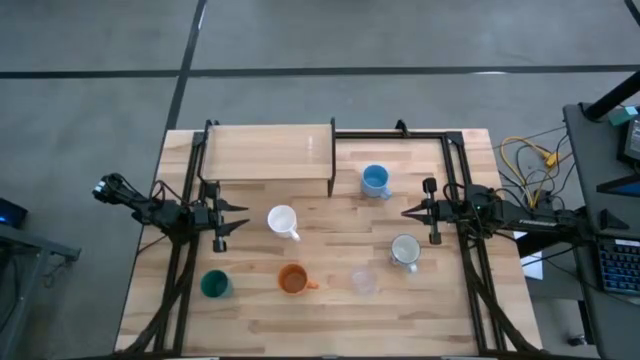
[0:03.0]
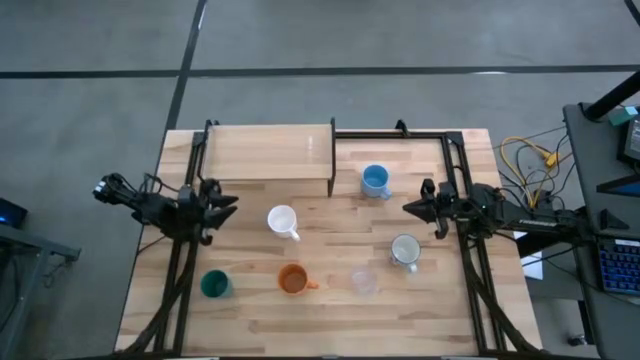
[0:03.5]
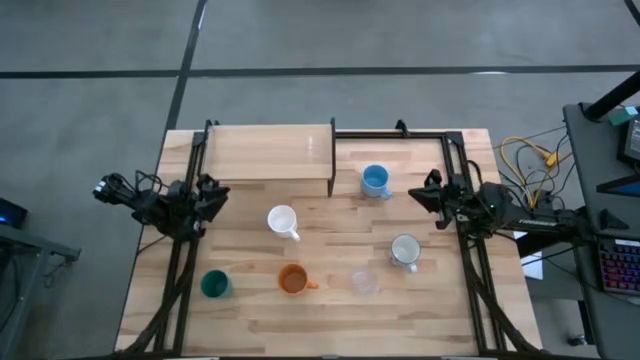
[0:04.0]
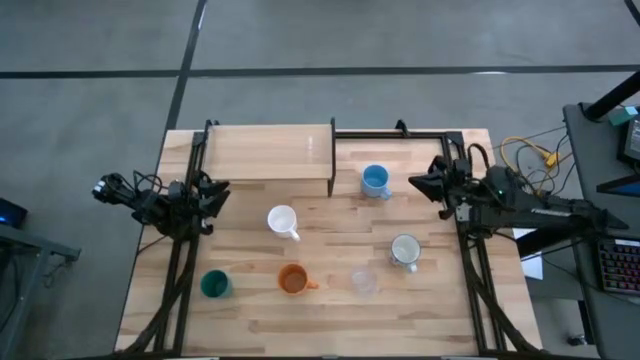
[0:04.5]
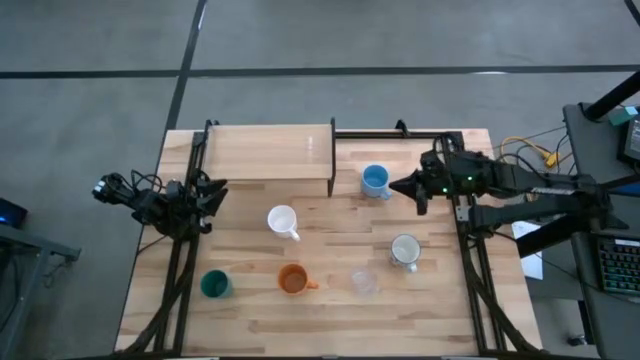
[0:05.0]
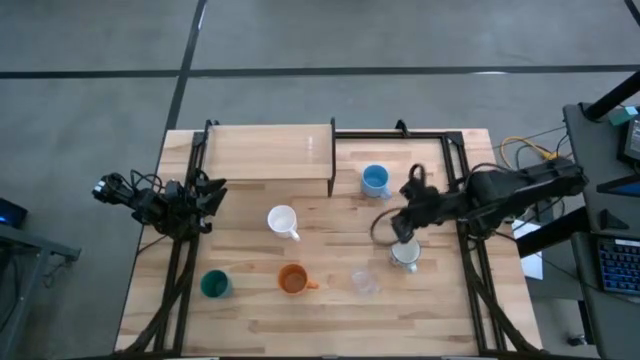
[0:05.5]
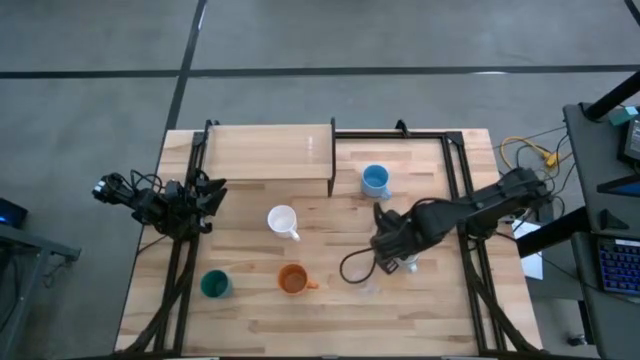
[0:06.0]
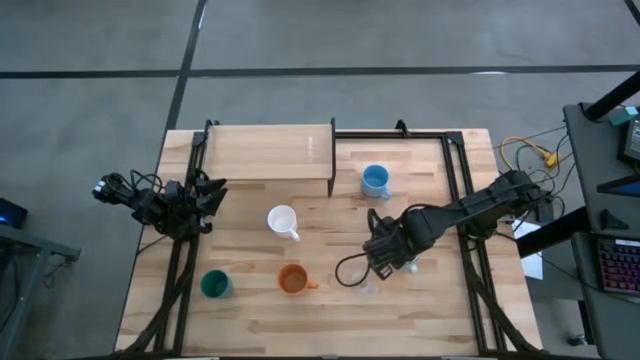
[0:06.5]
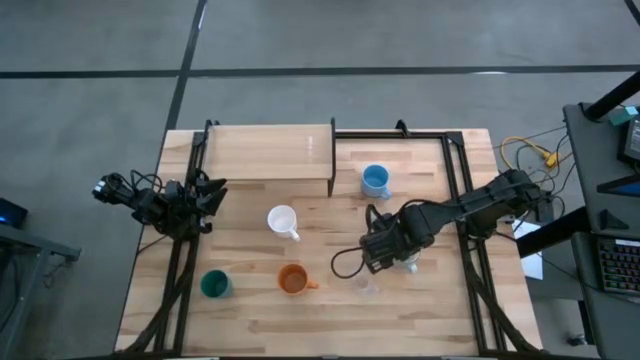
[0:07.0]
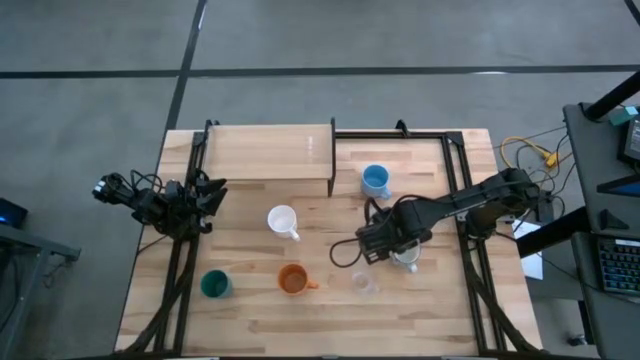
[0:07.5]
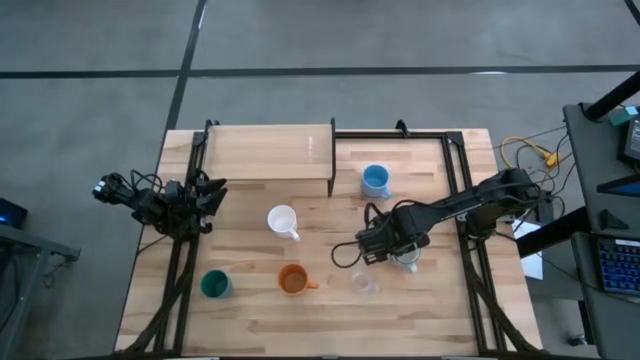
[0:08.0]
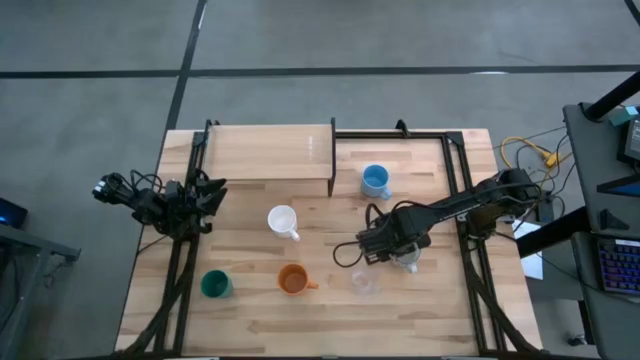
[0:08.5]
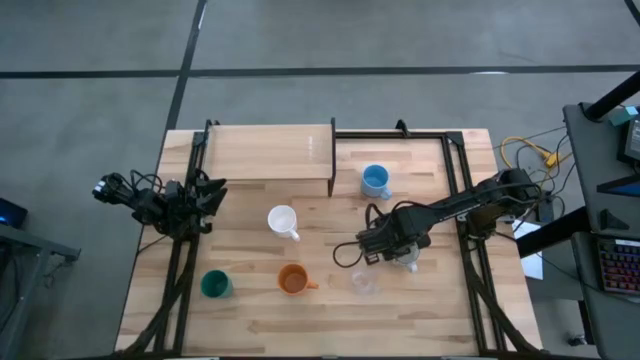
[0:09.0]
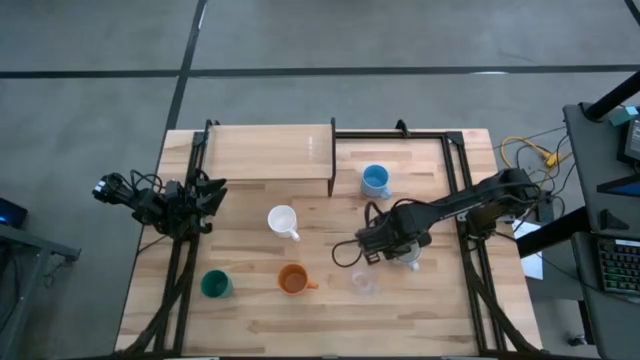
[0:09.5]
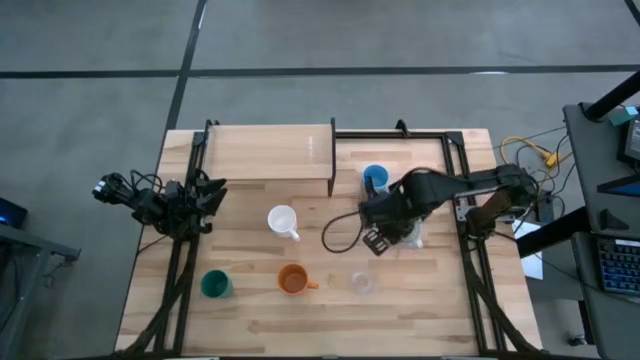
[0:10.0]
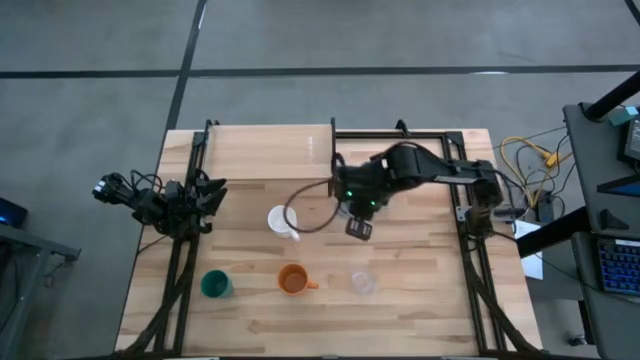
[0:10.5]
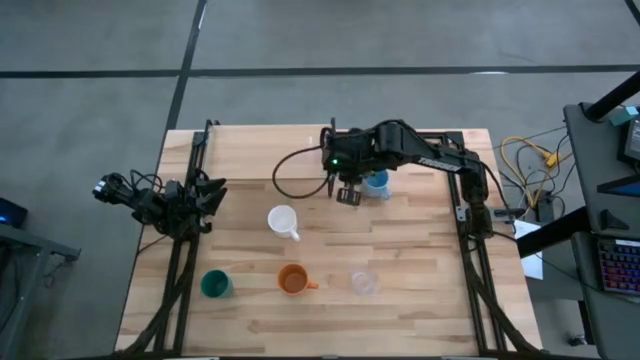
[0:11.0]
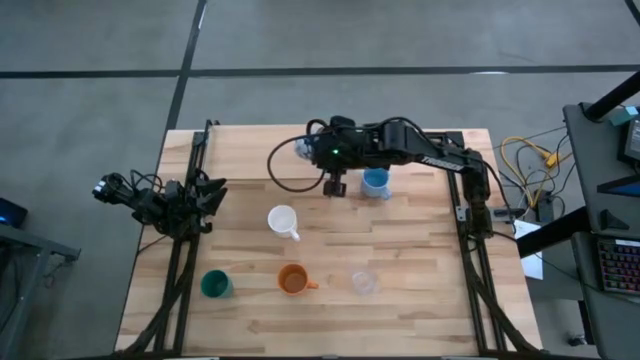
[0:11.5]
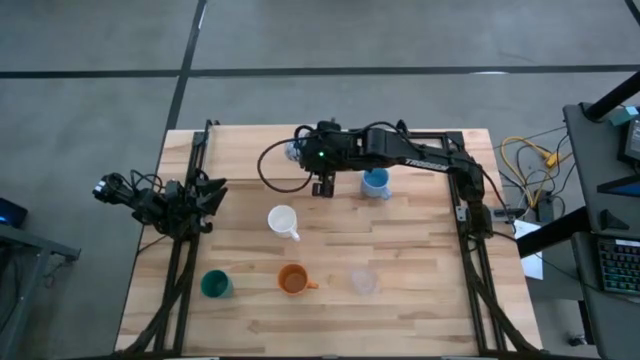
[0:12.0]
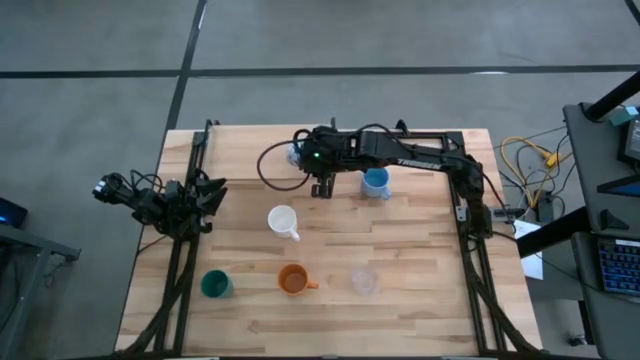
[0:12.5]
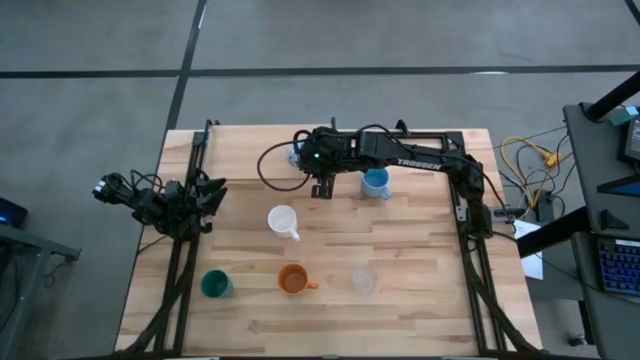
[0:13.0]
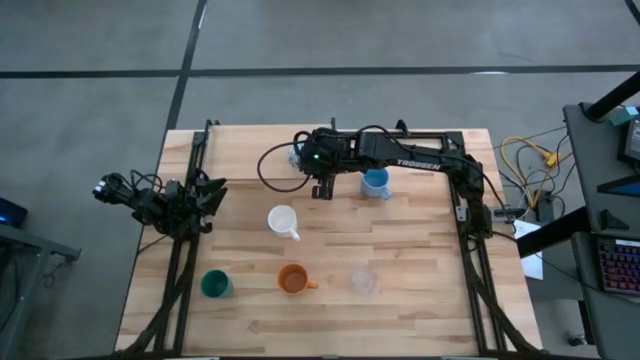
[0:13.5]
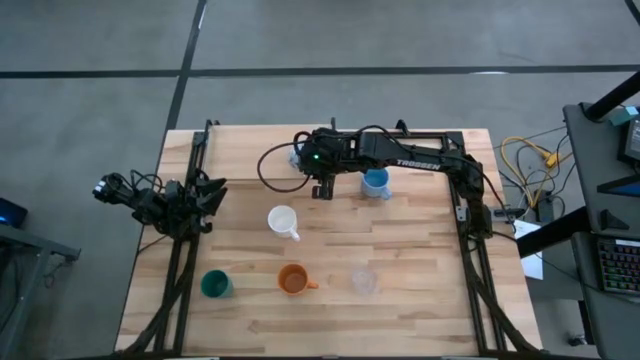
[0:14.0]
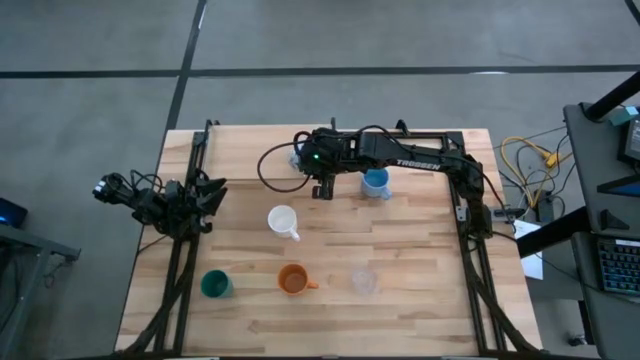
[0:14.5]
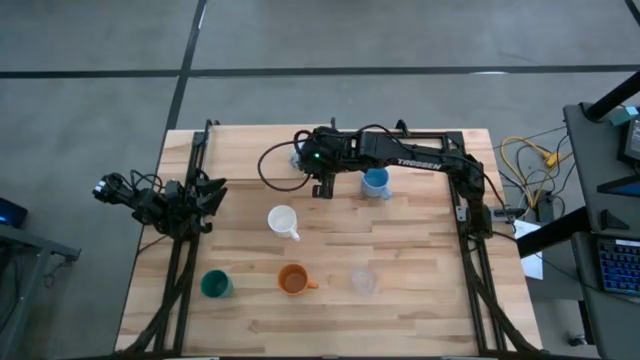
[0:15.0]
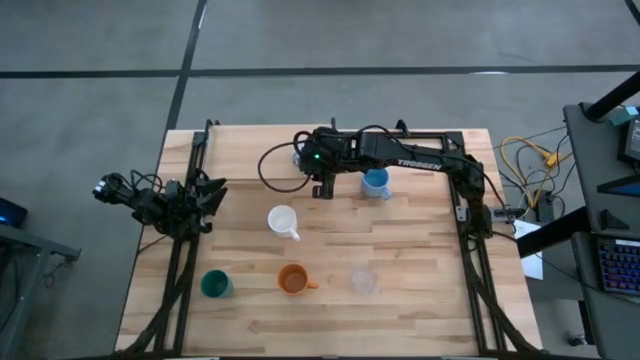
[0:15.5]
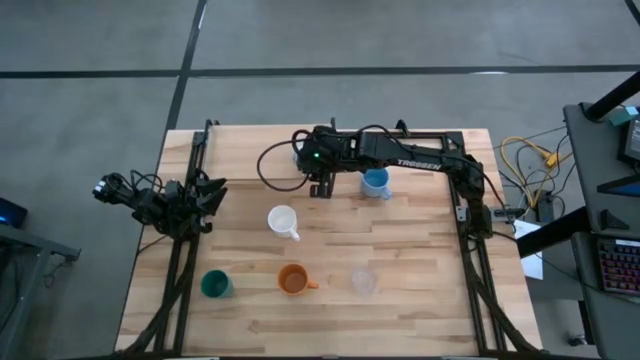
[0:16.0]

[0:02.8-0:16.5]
Task: Stack small to large cups/mugs on shelf
Put the blue patterned mug on the shelf

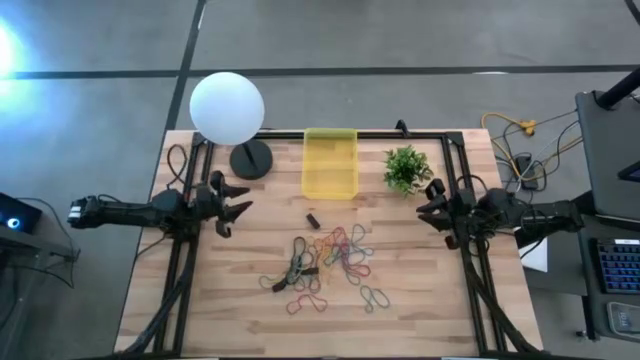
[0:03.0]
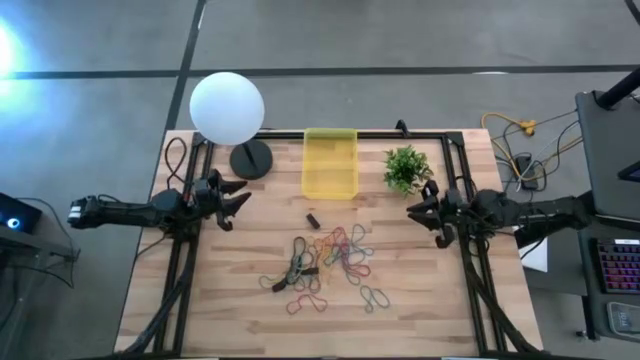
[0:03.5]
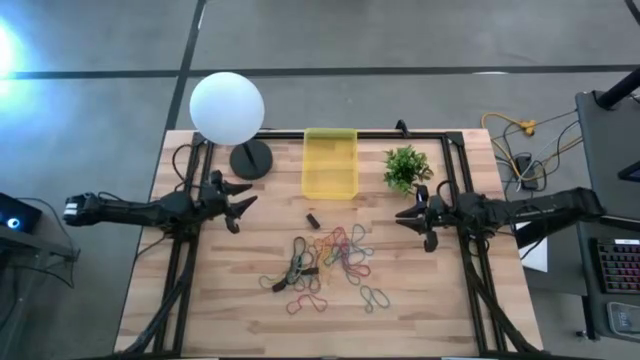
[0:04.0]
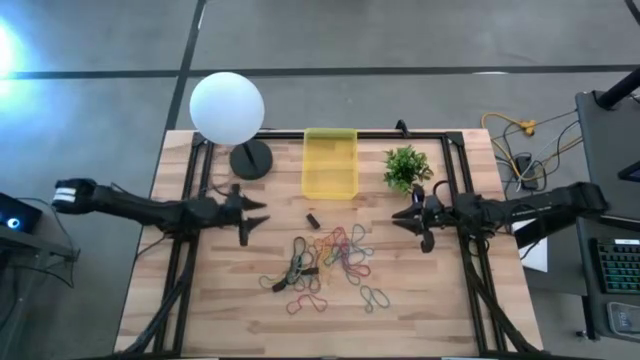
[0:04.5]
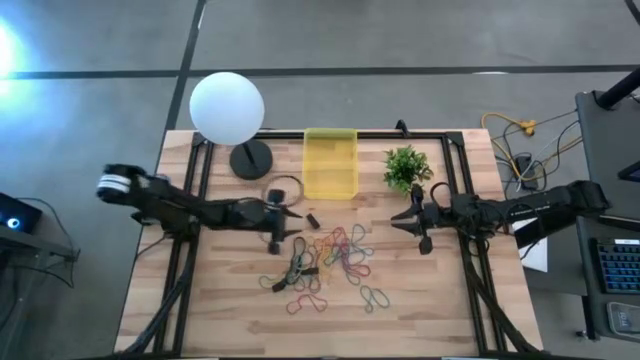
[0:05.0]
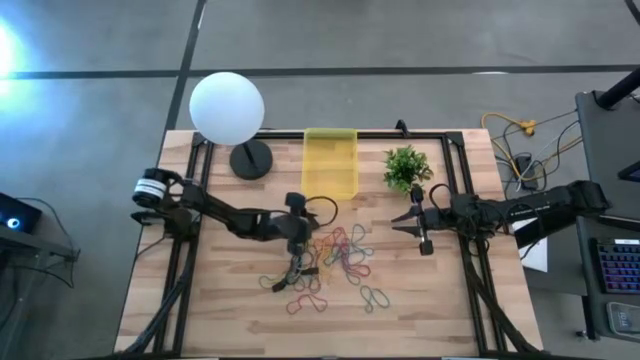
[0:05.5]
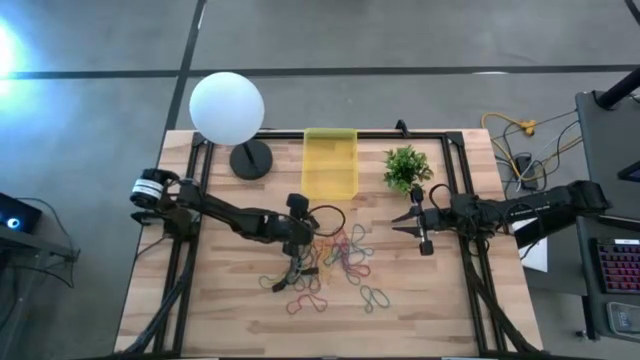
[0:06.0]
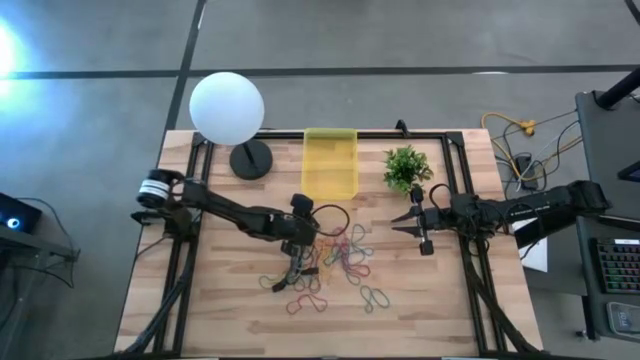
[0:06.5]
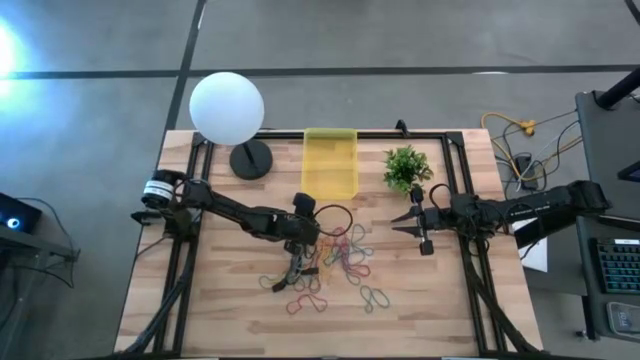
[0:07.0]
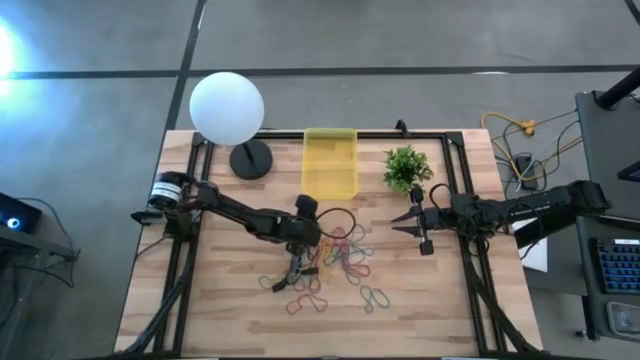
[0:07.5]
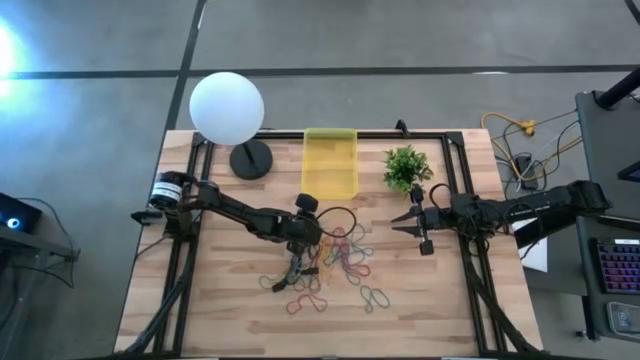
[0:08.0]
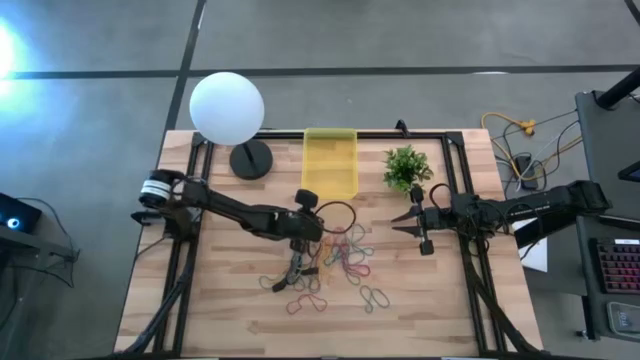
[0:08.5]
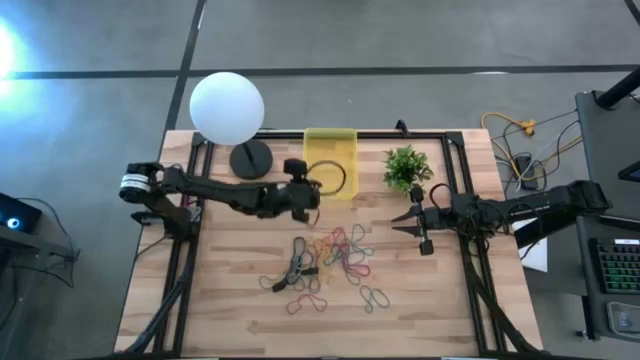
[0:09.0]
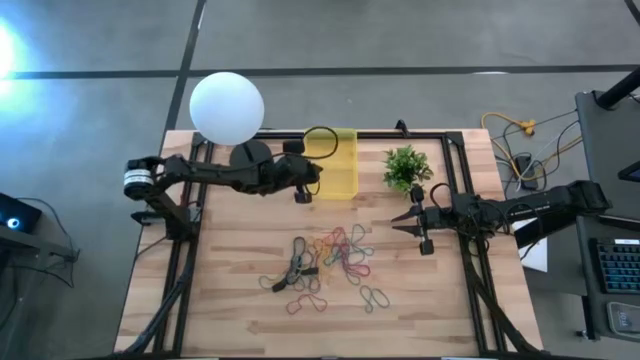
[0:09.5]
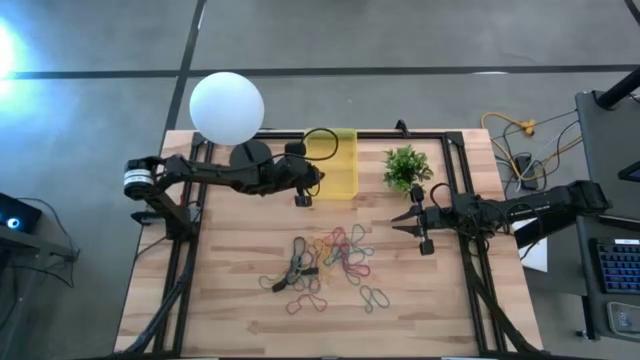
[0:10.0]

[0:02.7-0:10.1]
Task: Pick and place rubber bands into bin
Put the black rubber band into the yellow bin
